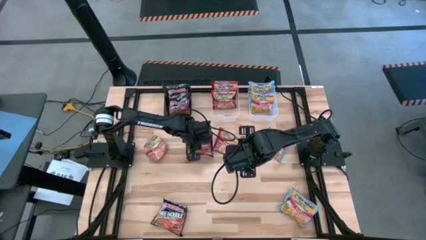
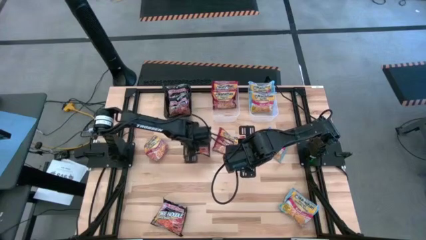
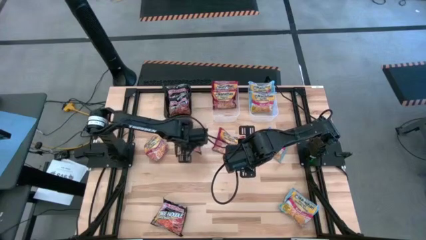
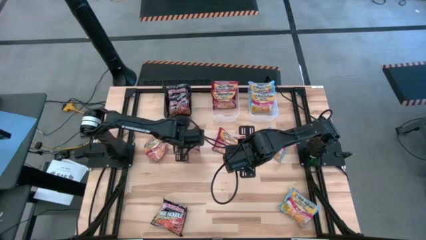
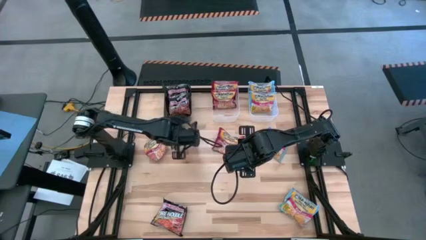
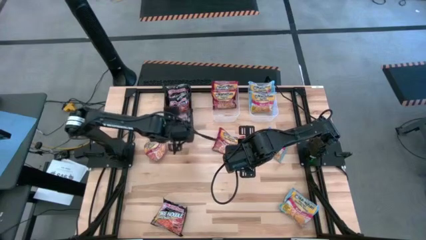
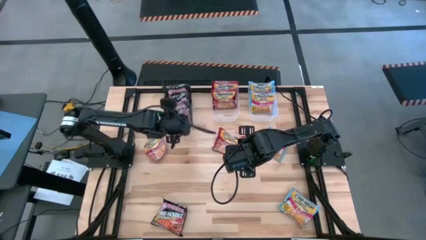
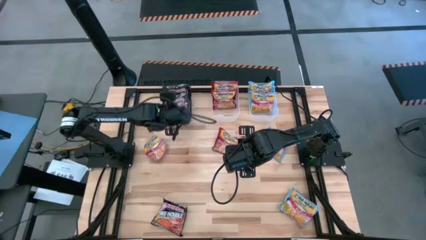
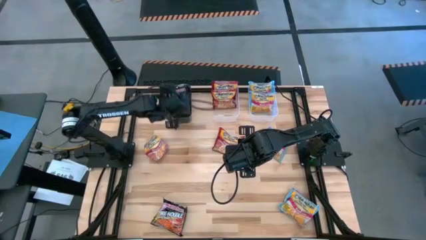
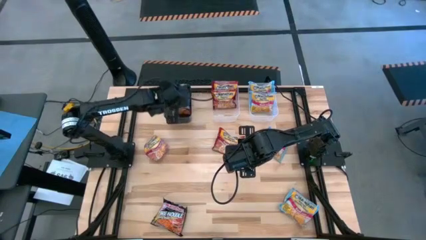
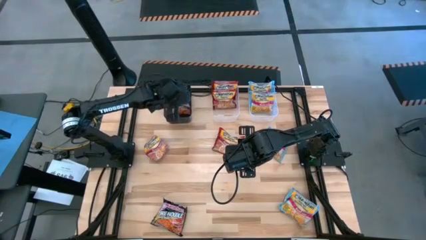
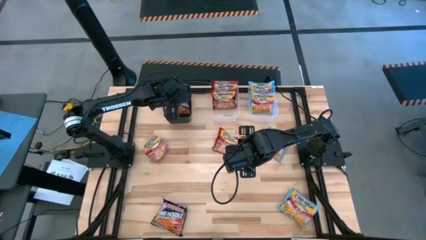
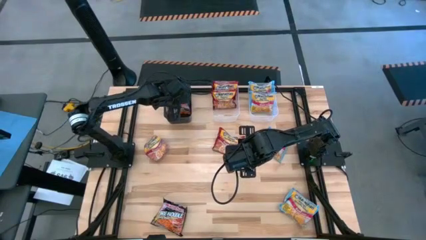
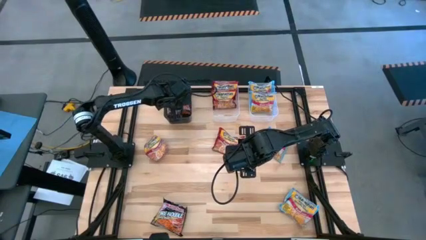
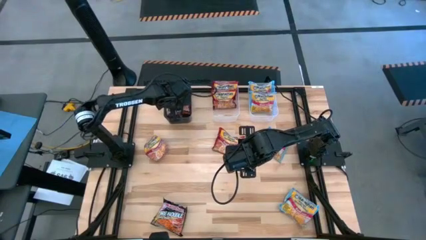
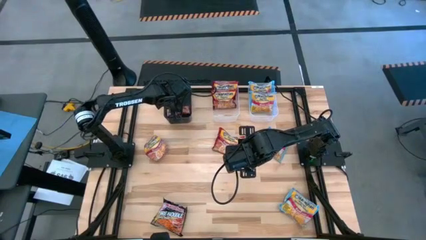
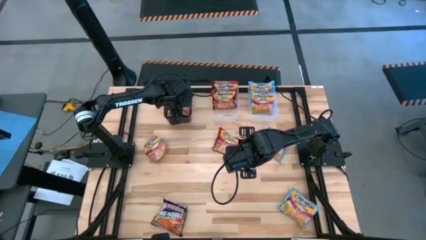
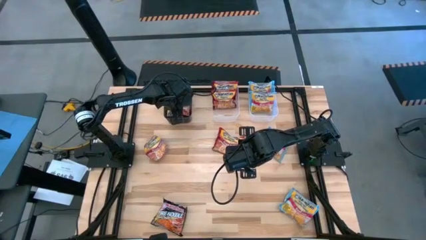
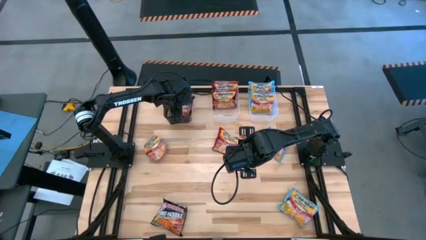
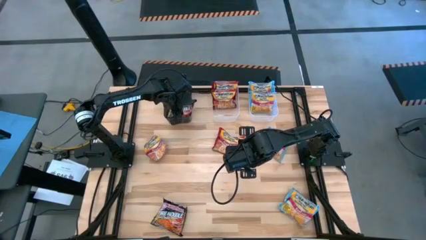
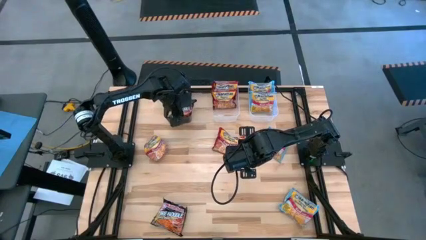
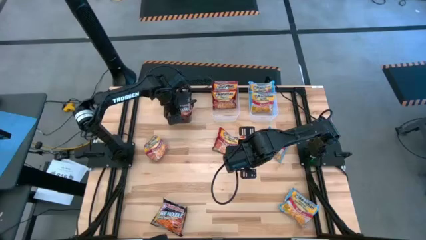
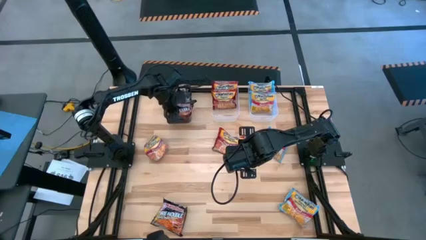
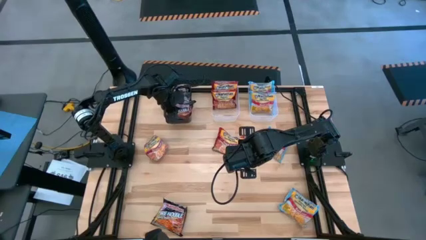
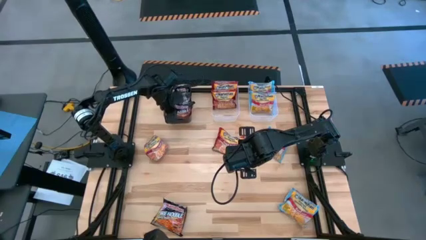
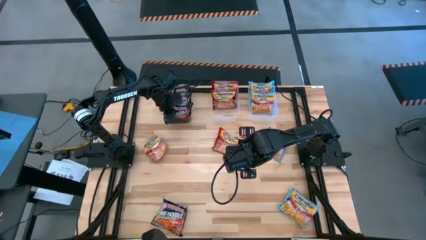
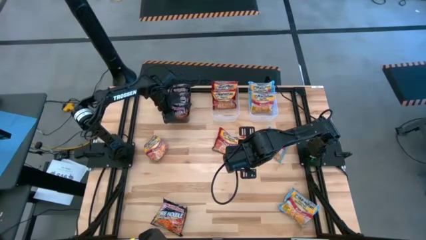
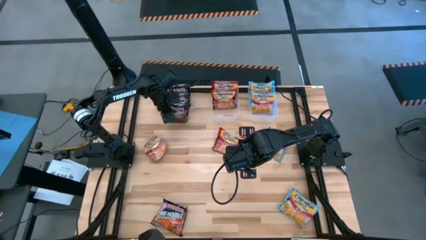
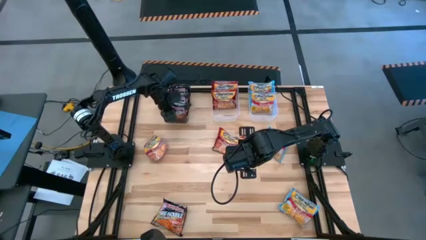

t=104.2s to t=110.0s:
Task: Sort Maruchan noodles
Put the black noodle pack into the black bin

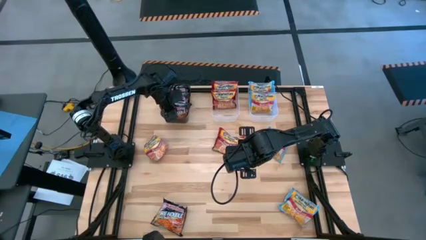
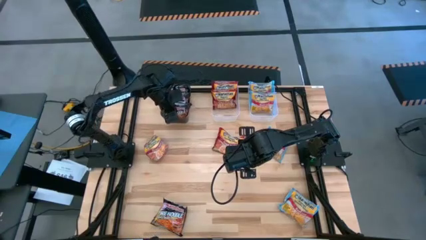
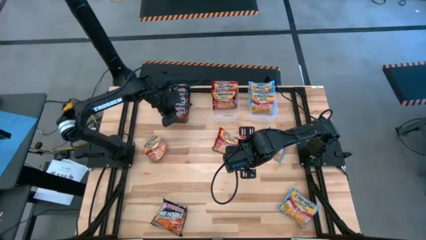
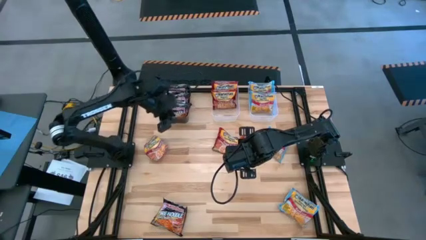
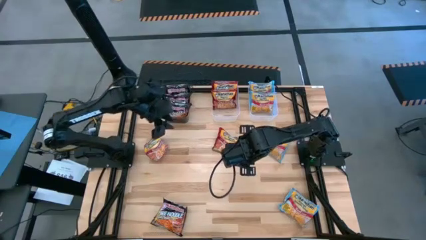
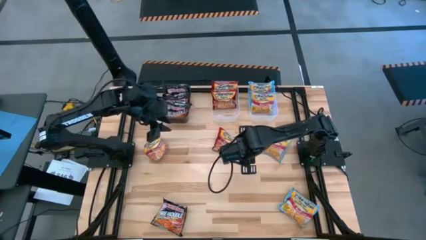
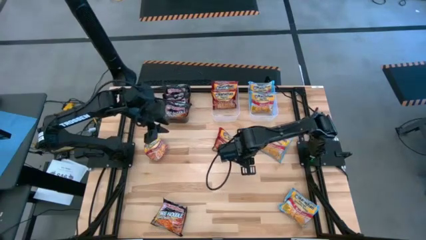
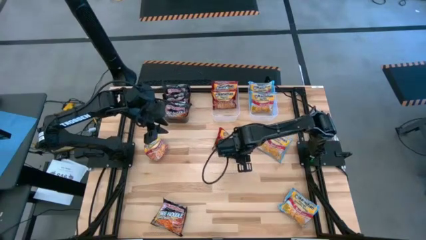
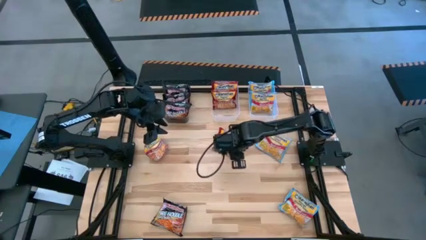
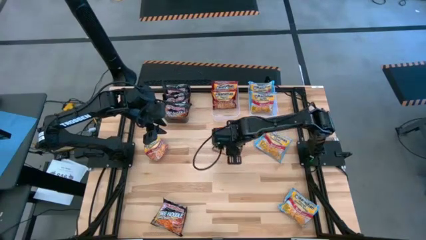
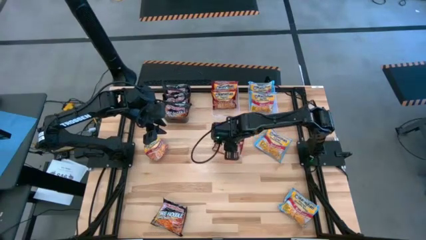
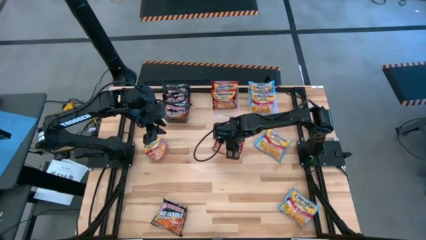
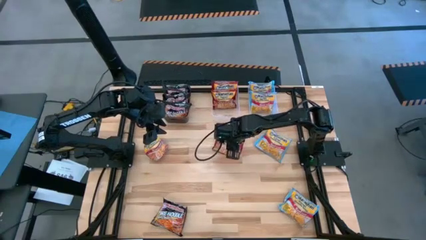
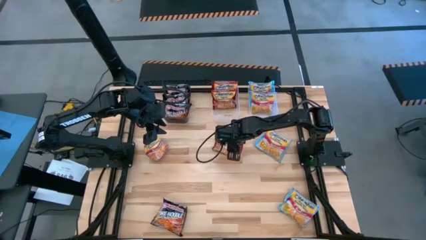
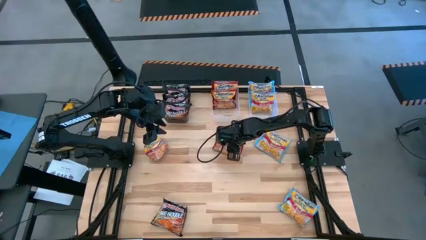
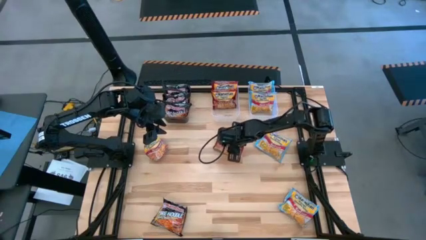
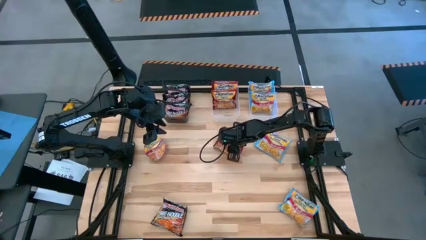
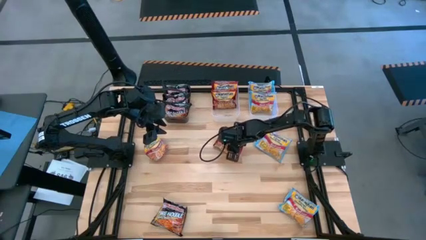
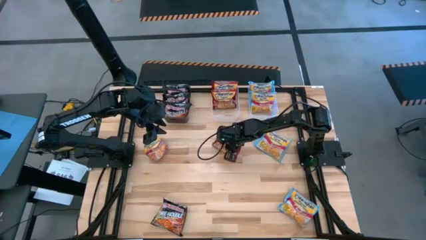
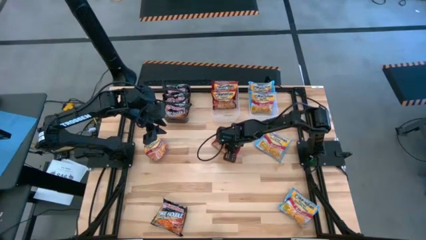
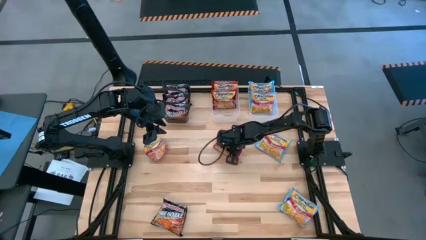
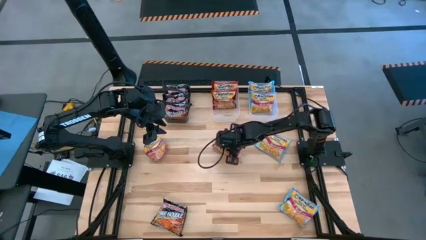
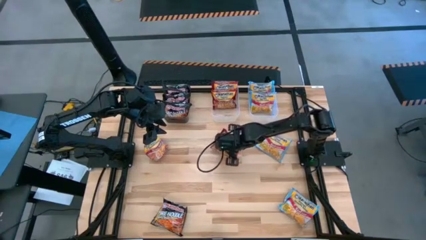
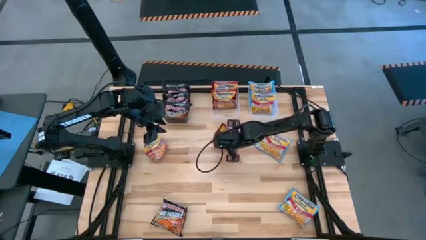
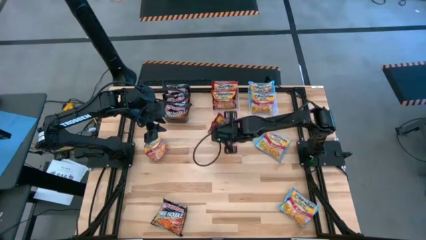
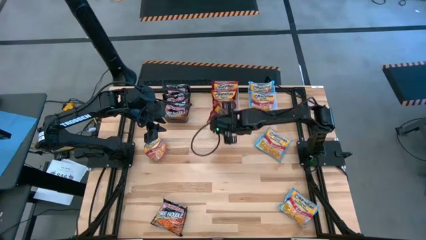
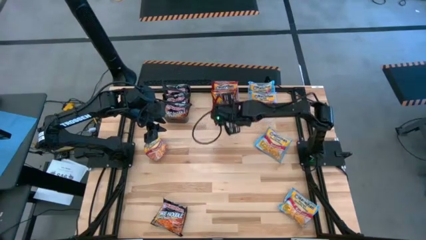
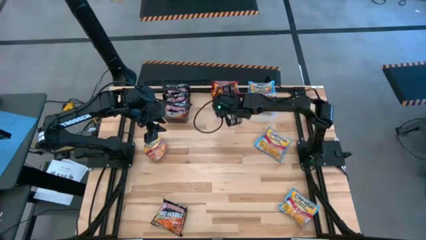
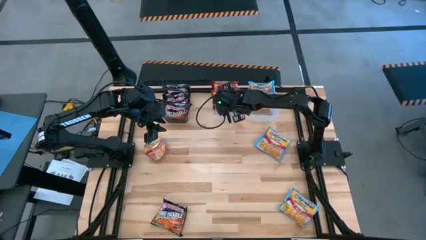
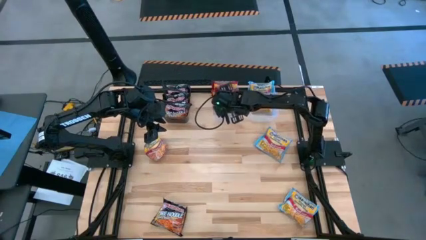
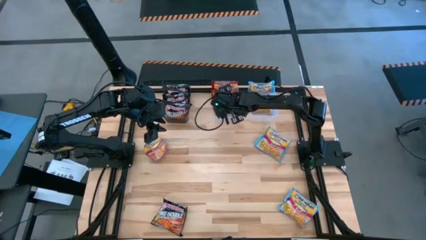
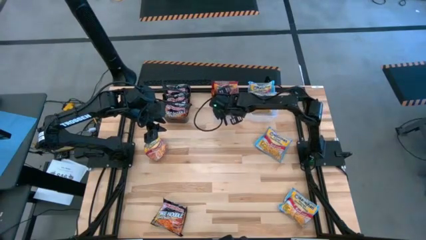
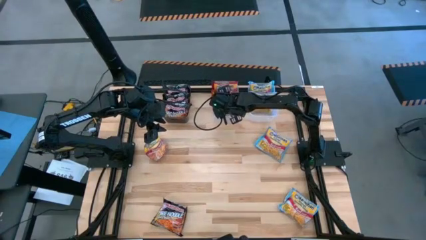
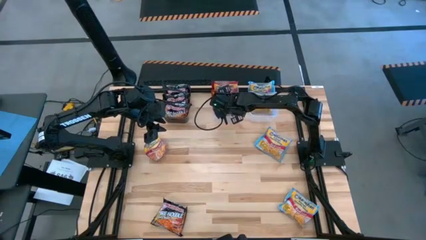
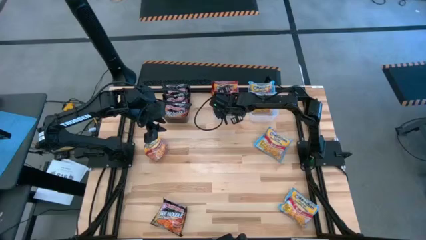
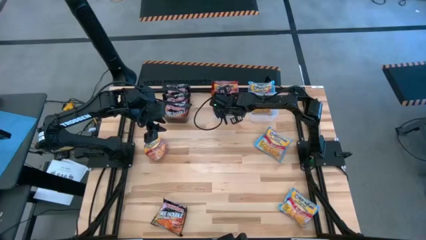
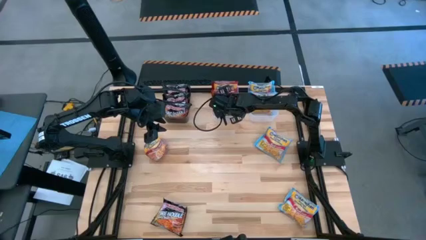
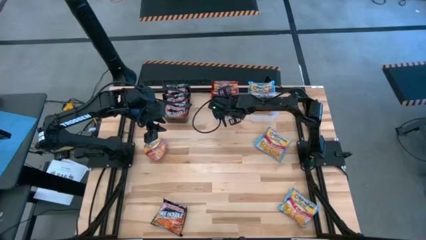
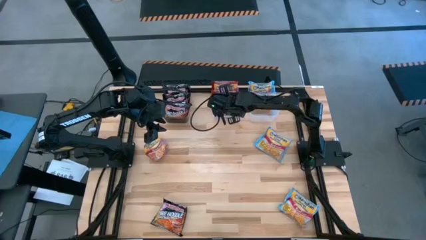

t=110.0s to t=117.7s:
Put the red noodle pack into the left transparent bin
